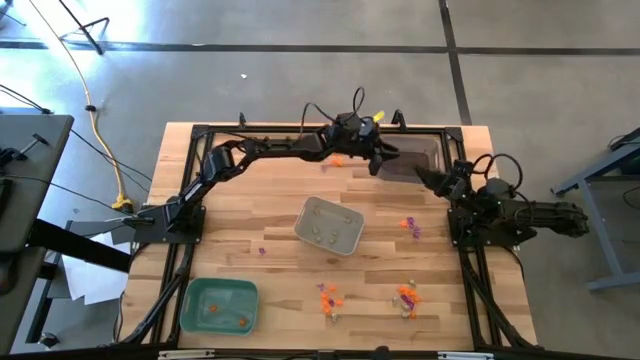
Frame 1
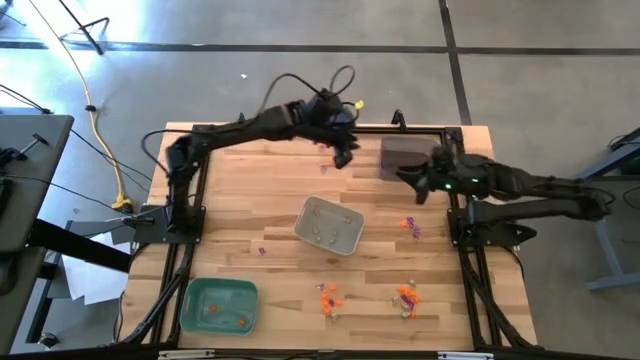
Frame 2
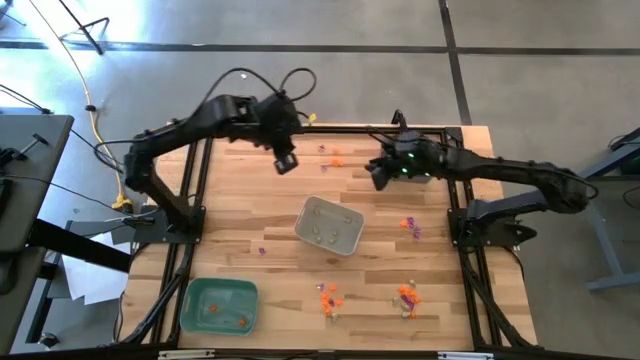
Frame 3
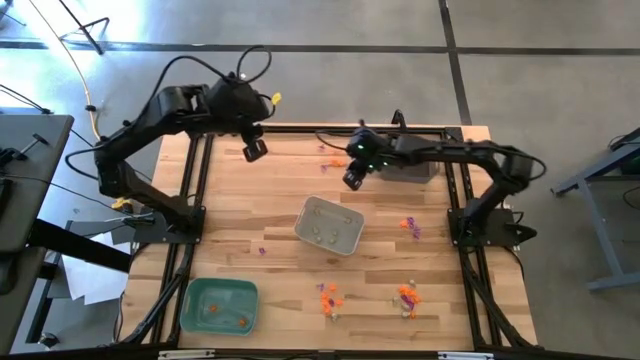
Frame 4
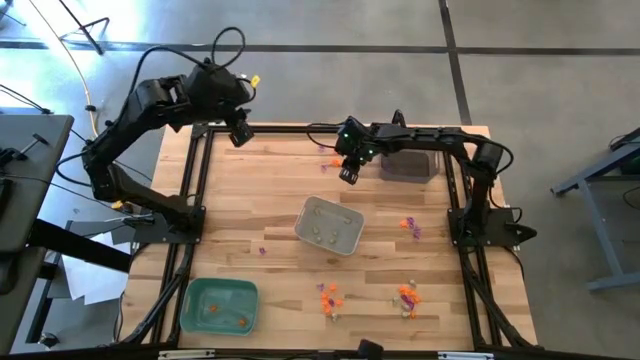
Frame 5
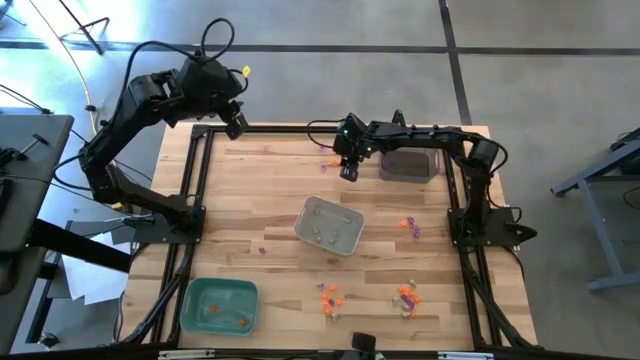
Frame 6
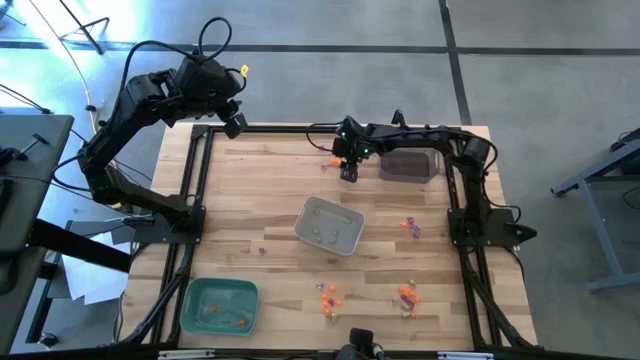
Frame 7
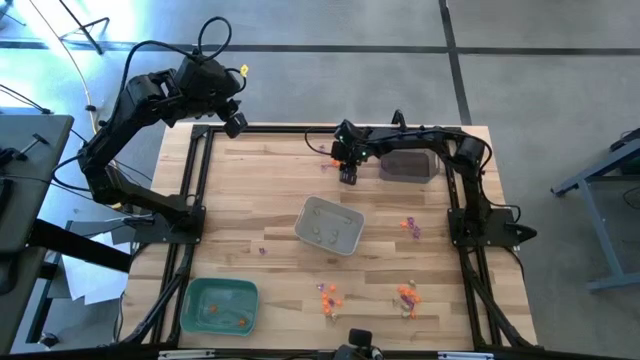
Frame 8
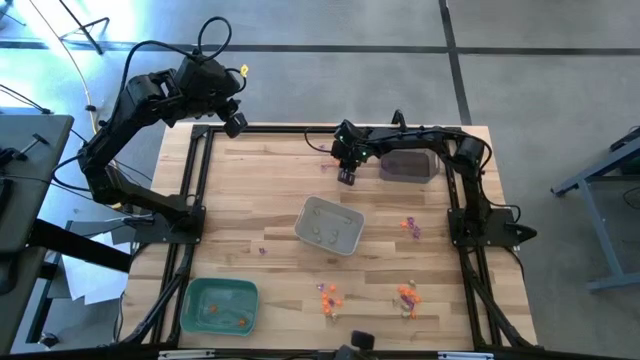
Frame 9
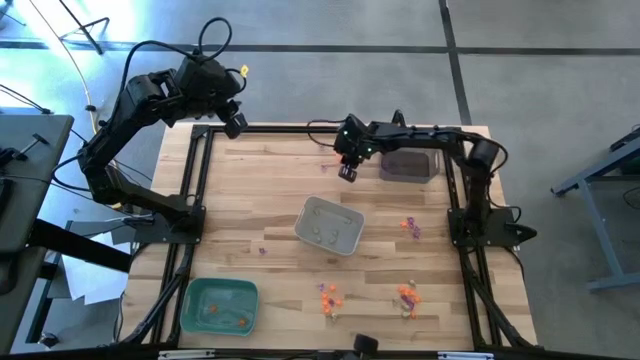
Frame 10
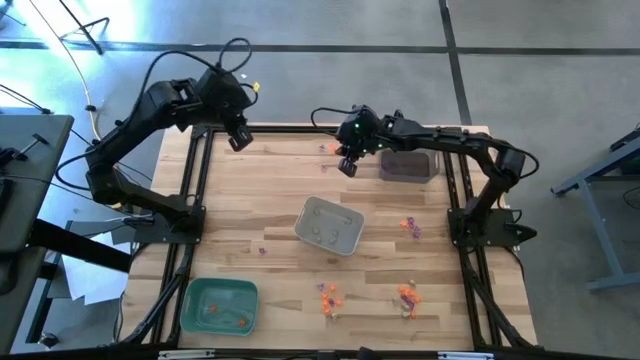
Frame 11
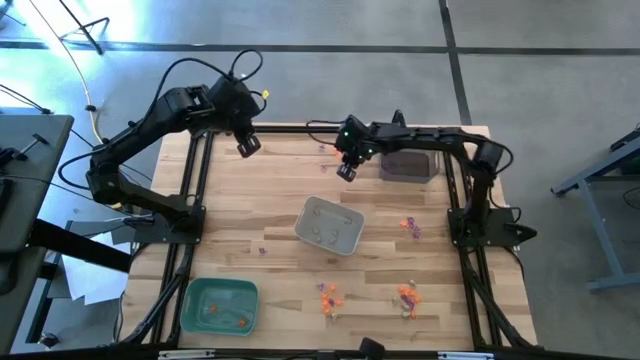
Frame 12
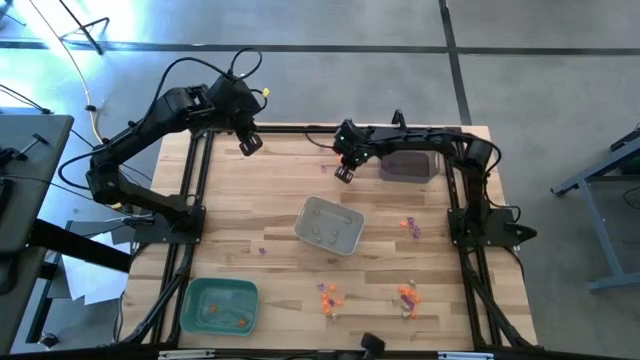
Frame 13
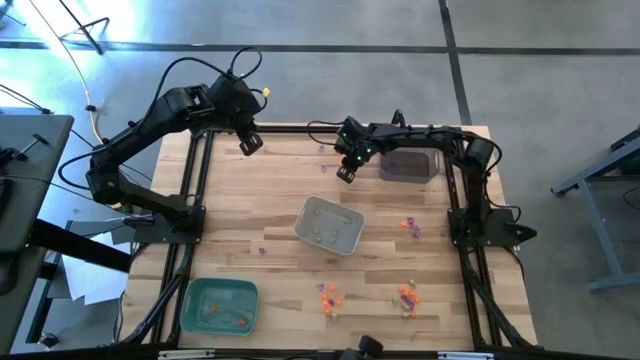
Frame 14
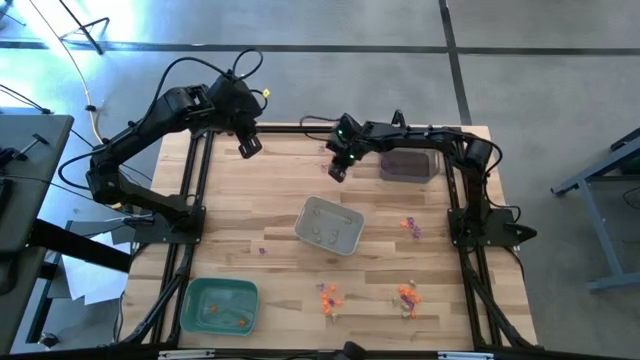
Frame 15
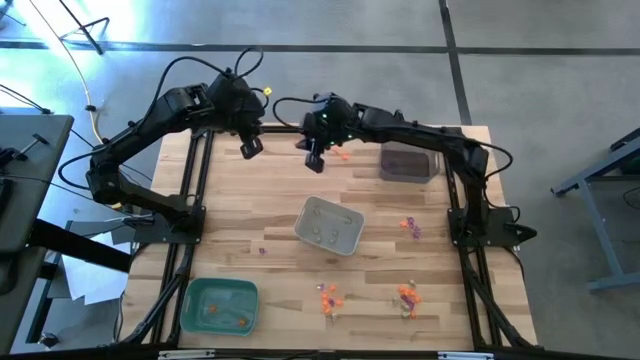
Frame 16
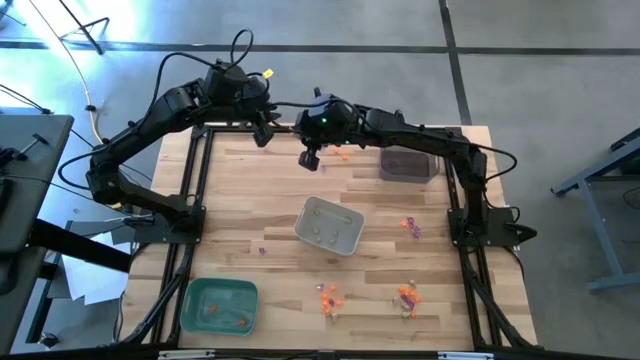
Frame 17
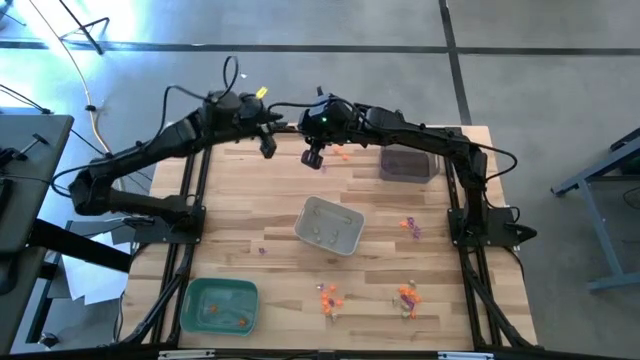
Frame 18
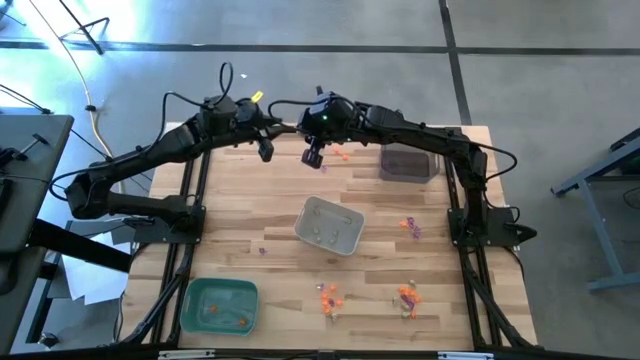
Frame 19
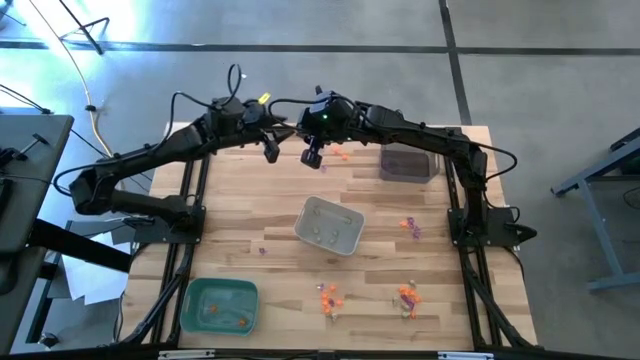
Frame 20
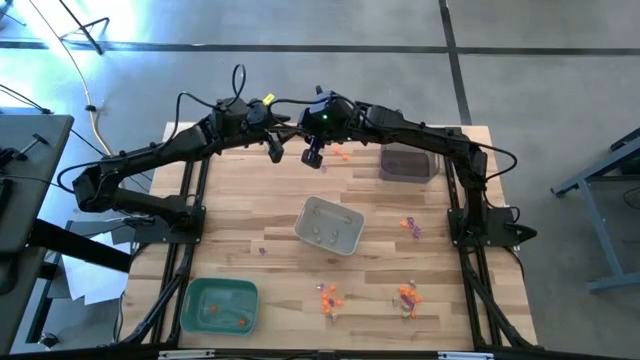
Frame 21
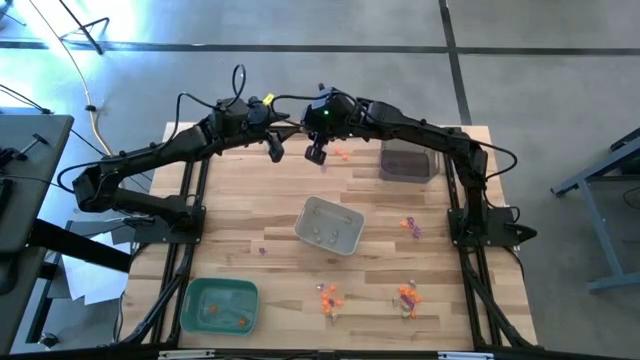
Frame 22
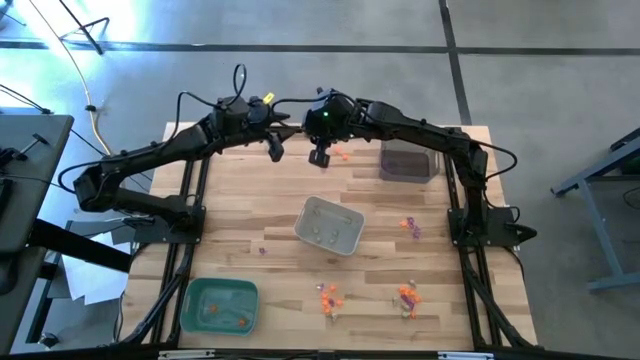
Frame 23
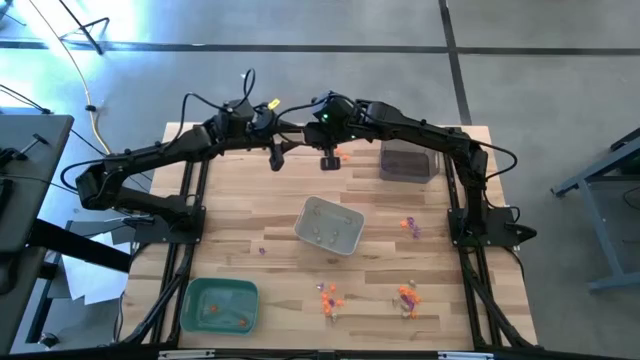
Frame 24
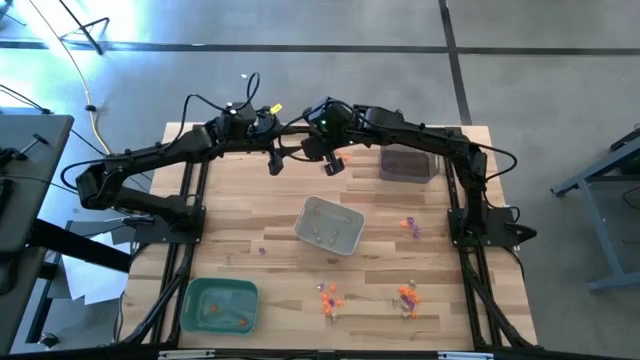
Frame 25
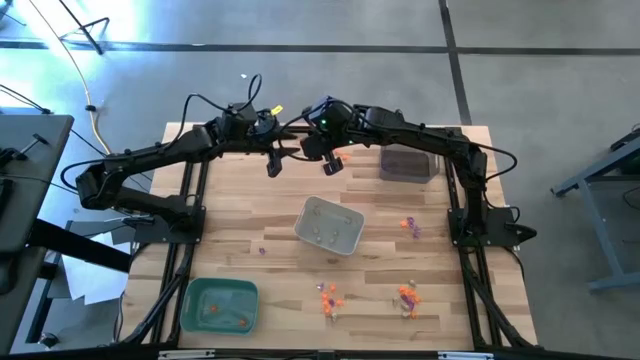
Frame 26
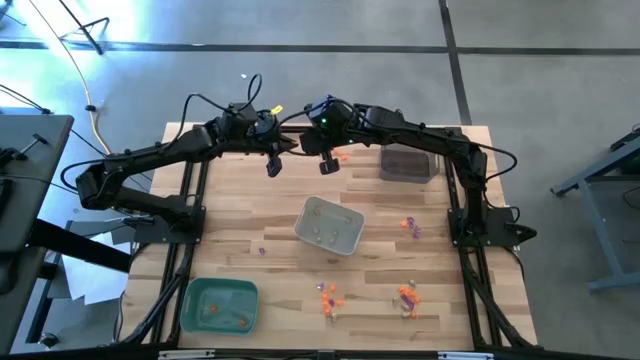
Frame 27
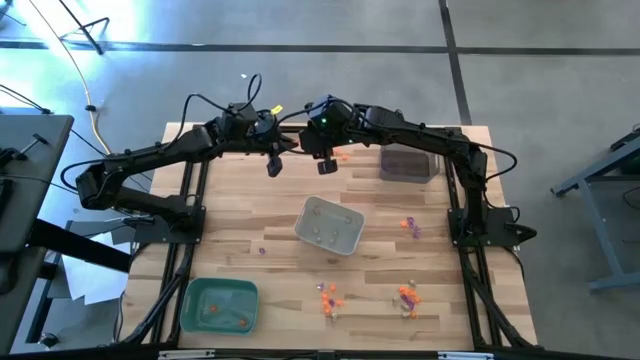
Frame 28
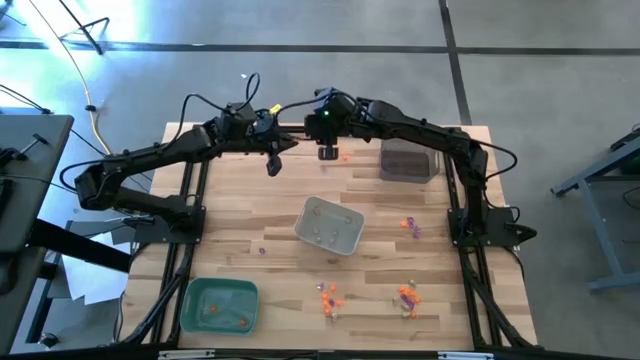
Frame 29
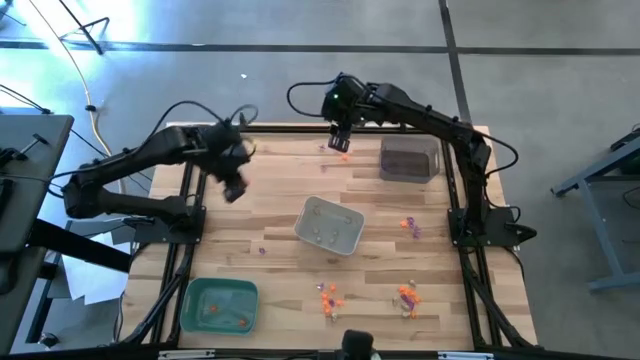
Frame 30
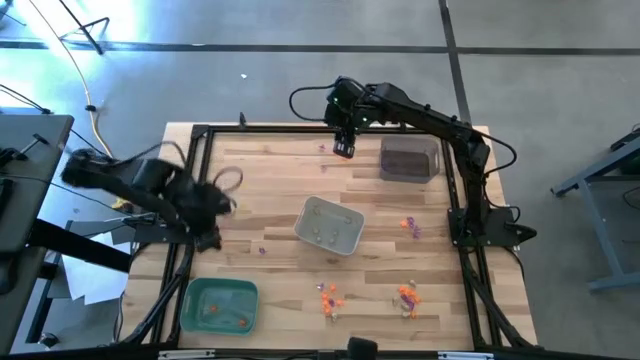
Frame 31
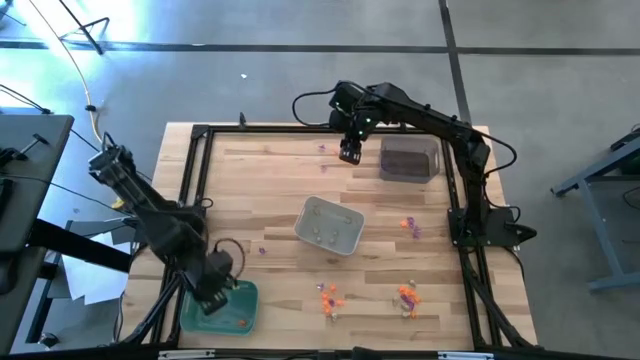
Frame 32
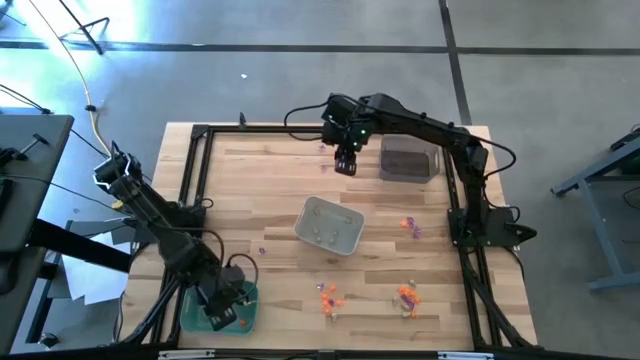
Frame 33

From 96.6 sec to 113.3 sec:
Task: Sort Halloween decoration
Put the orange spider toy into the green bin

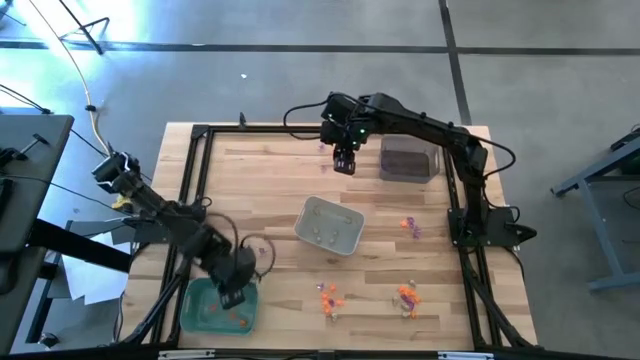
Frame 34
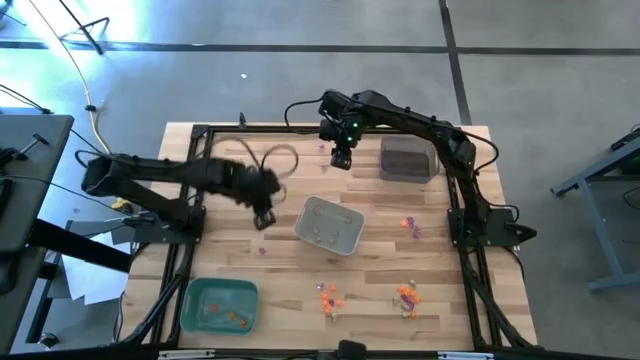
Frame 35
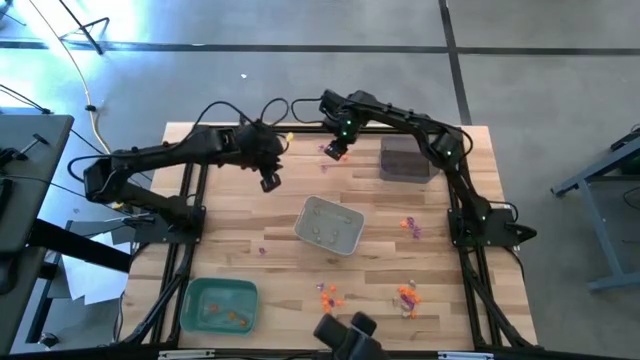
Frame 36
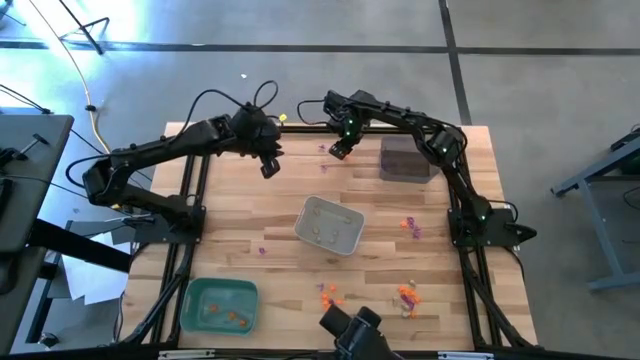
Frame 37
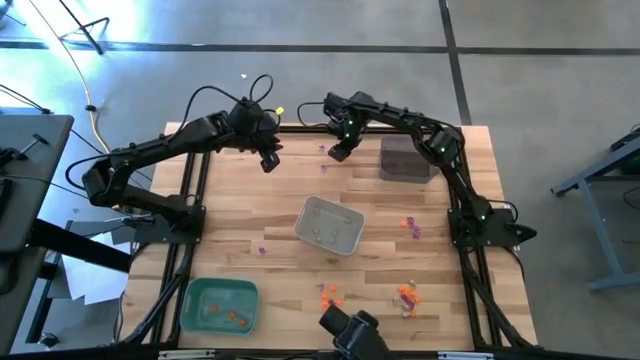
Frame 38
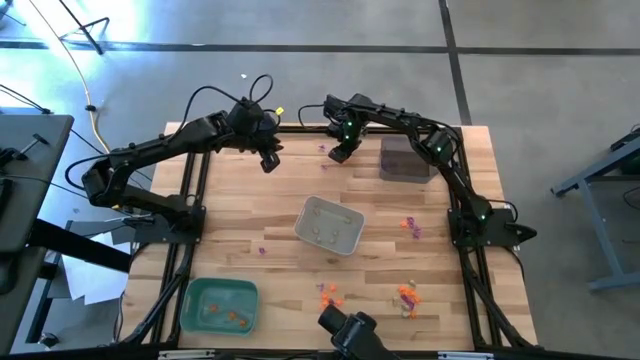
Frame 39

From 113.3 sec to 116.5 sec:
Put the orange spider toy into the green bin

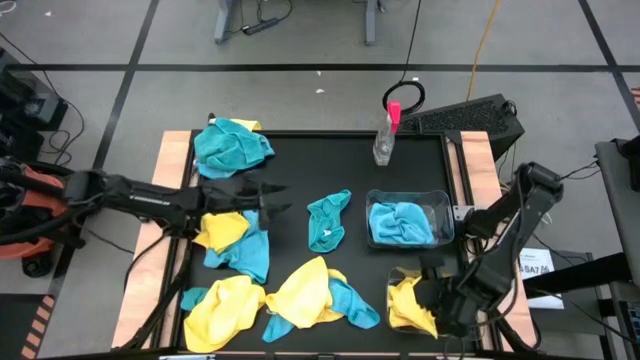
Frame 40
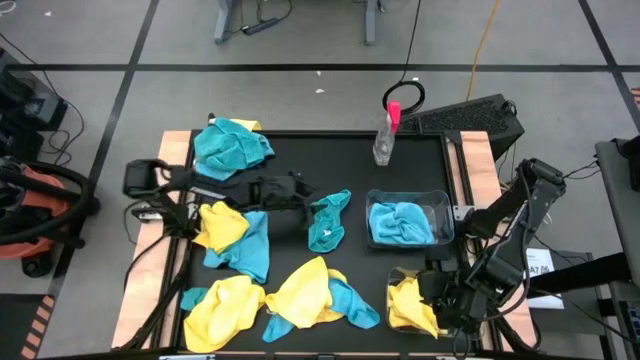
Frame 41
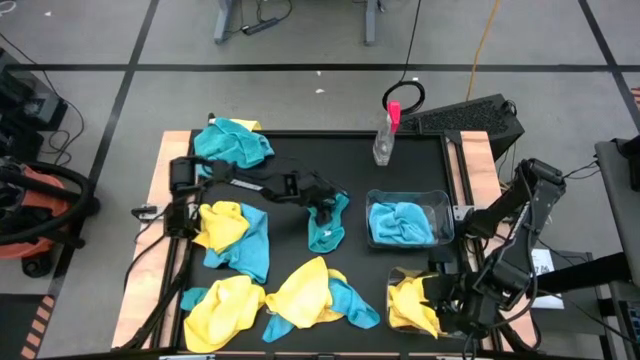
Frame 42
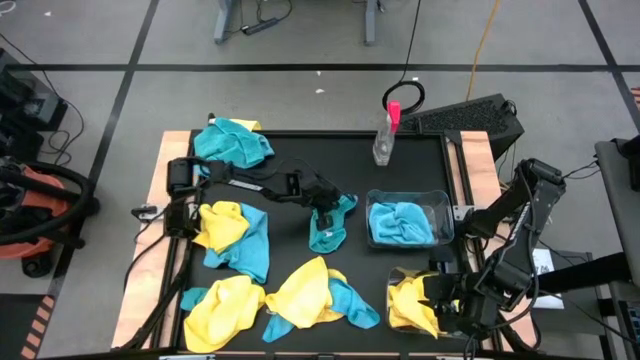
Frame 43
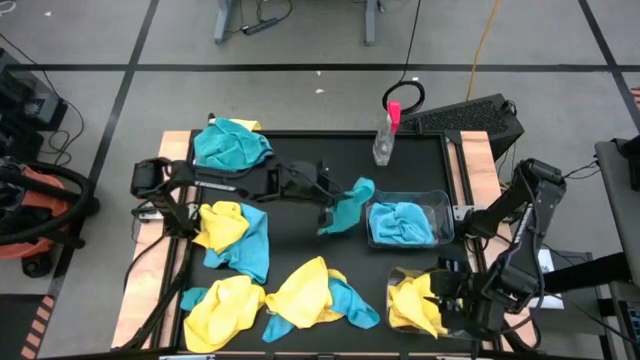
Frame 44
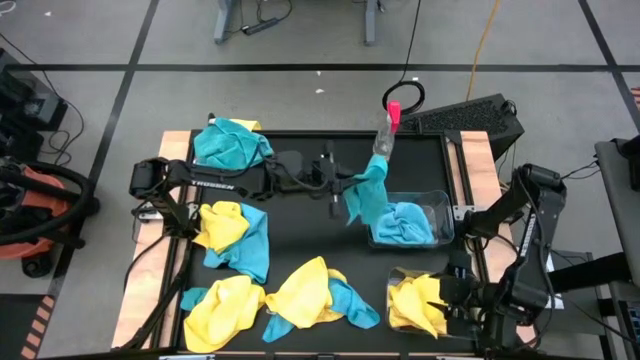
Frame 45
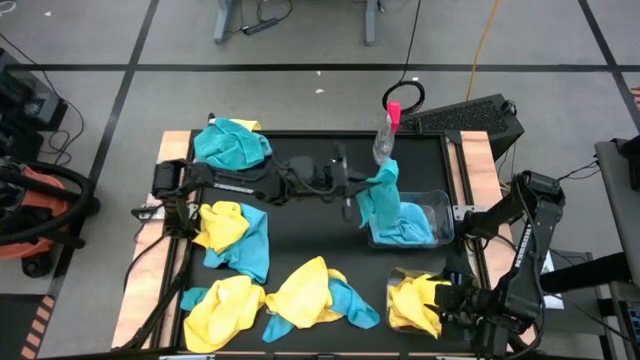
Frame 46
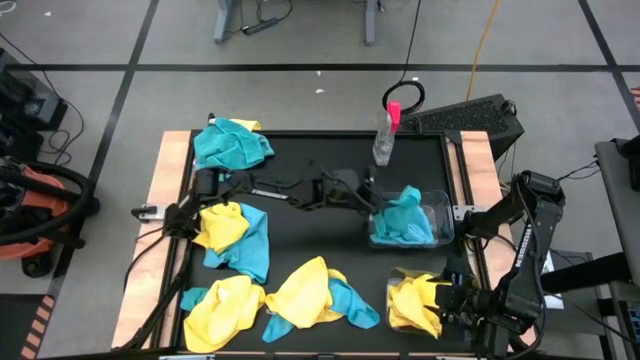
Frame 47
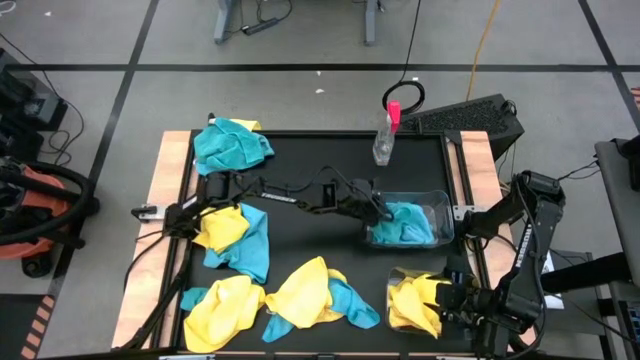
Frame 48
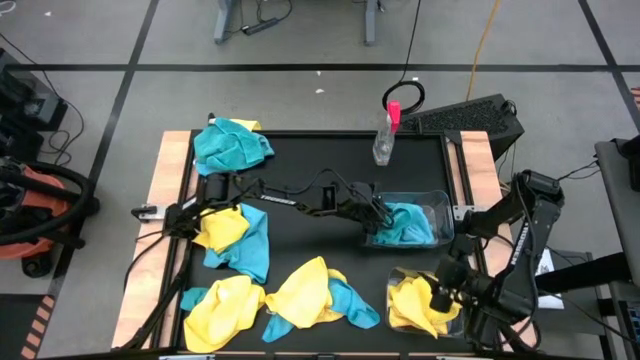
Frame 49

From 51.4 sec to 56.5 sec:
Task: Sort microfiber towel by color & place in baskets
Put the blue towel into the top transparent bin
